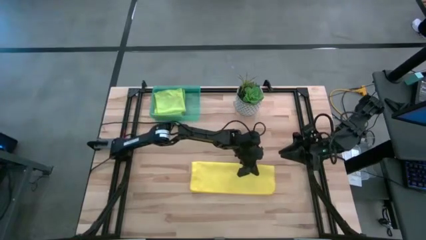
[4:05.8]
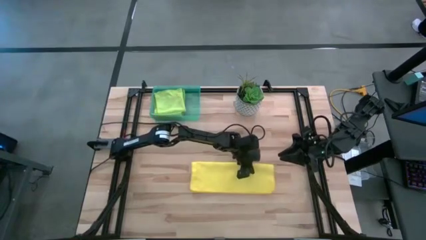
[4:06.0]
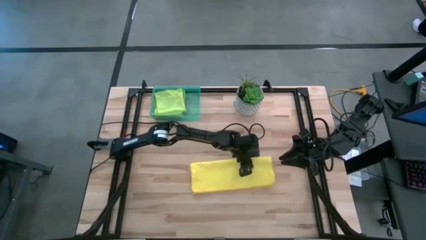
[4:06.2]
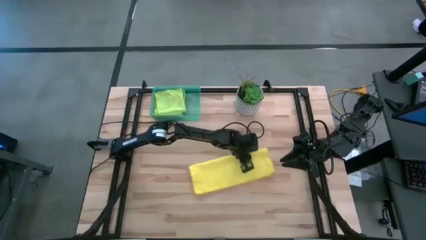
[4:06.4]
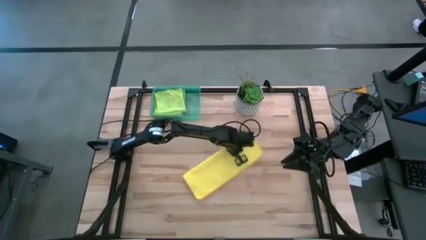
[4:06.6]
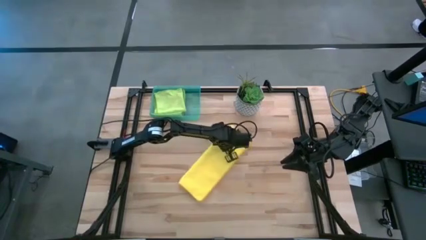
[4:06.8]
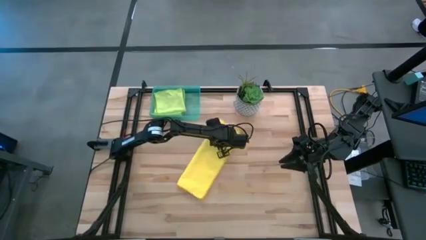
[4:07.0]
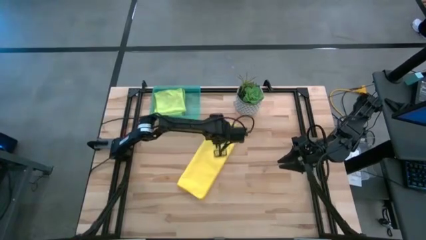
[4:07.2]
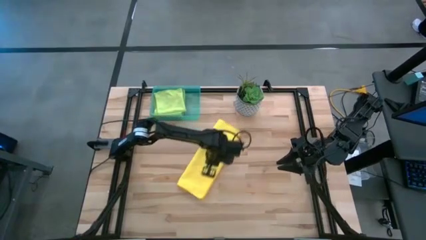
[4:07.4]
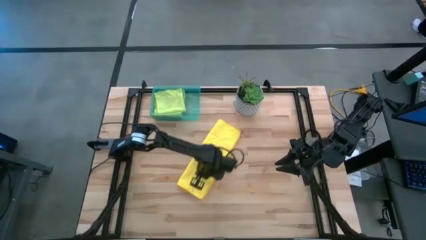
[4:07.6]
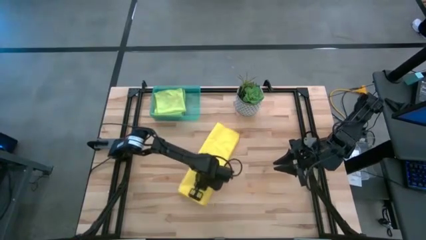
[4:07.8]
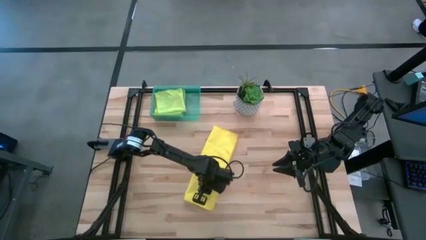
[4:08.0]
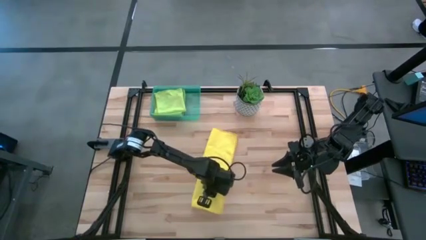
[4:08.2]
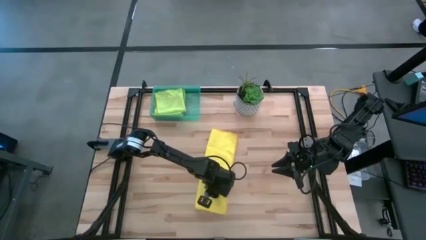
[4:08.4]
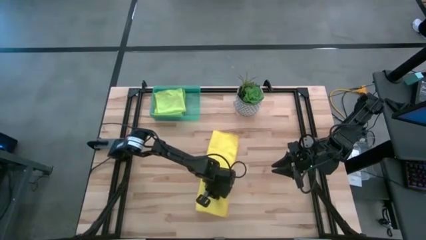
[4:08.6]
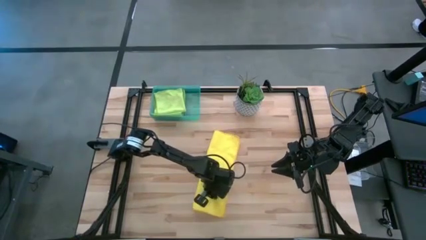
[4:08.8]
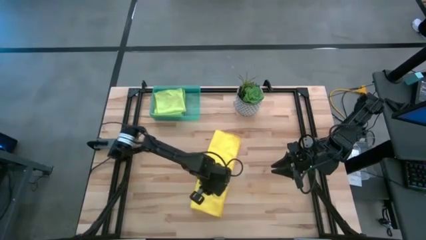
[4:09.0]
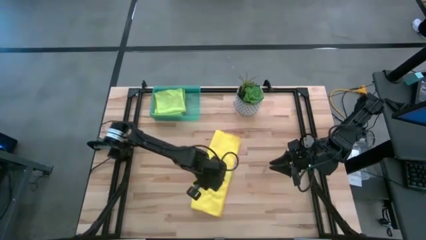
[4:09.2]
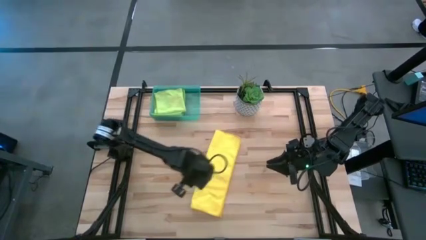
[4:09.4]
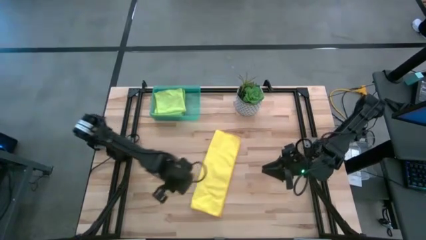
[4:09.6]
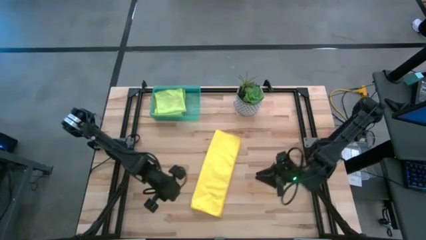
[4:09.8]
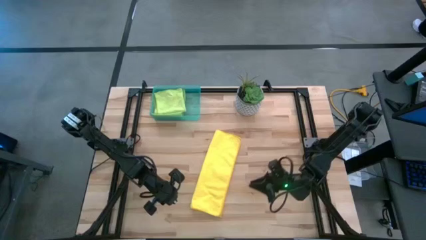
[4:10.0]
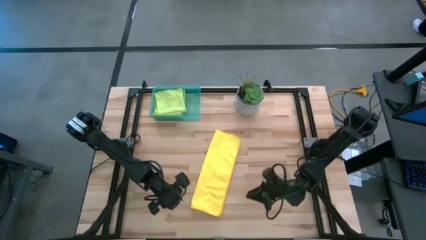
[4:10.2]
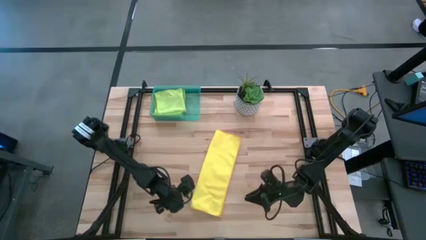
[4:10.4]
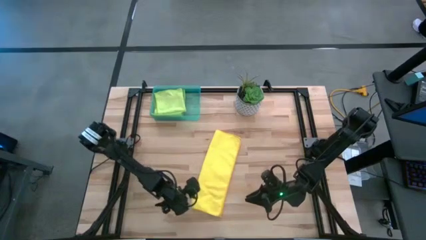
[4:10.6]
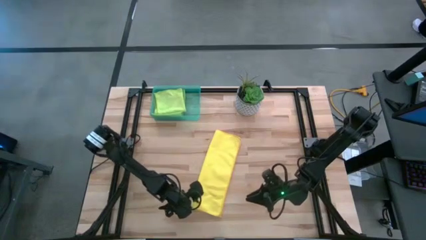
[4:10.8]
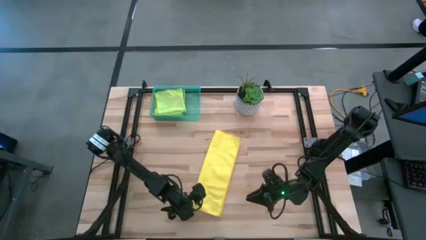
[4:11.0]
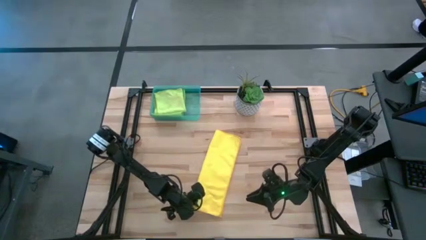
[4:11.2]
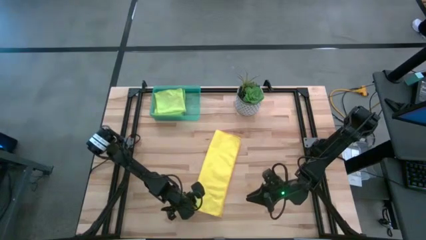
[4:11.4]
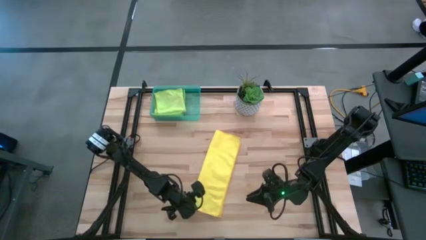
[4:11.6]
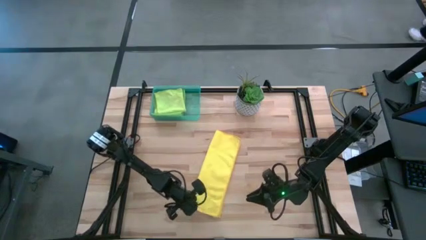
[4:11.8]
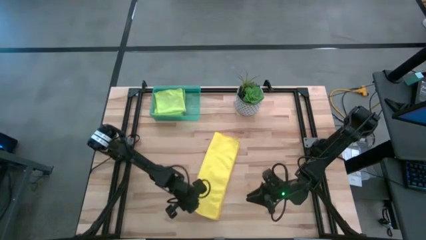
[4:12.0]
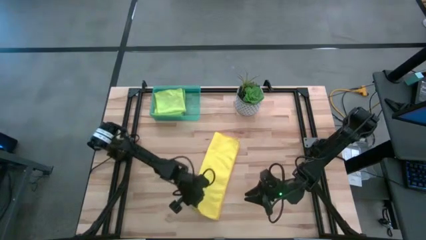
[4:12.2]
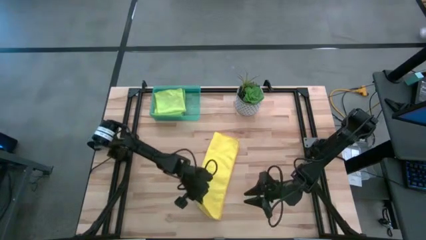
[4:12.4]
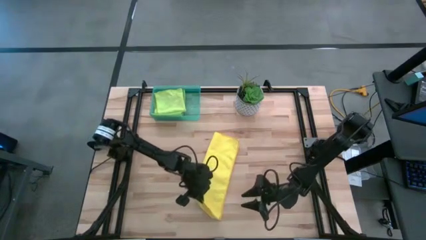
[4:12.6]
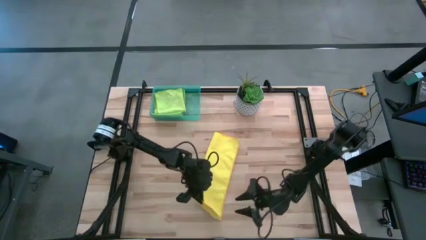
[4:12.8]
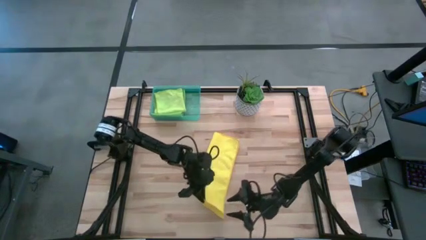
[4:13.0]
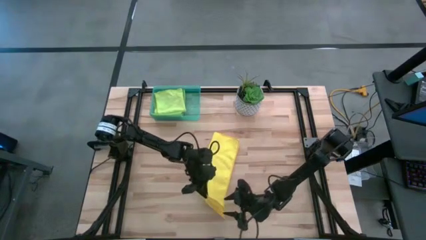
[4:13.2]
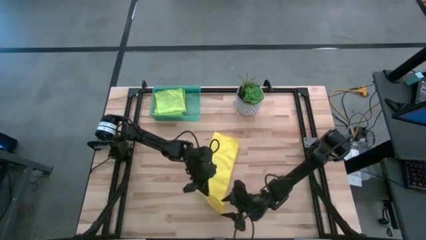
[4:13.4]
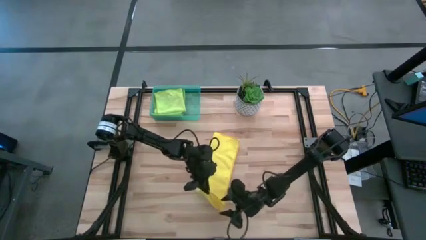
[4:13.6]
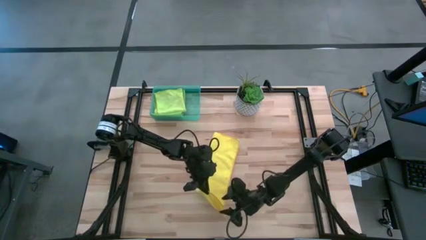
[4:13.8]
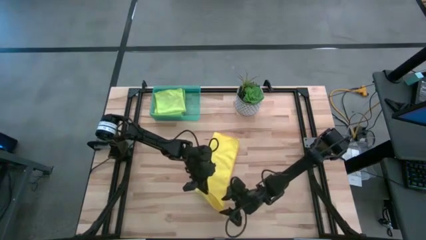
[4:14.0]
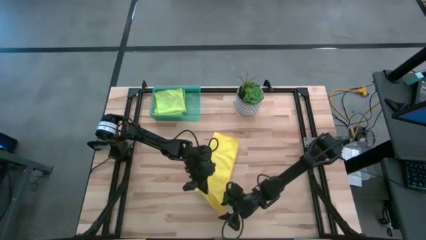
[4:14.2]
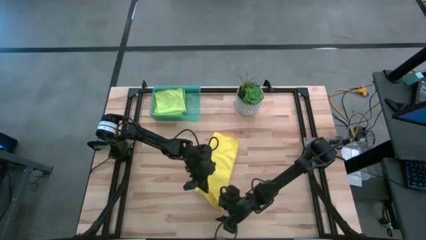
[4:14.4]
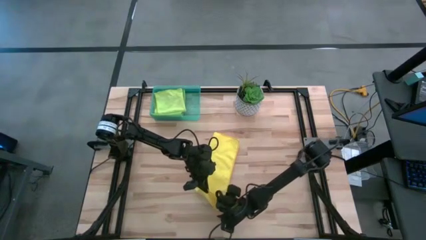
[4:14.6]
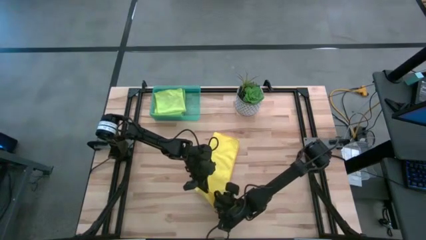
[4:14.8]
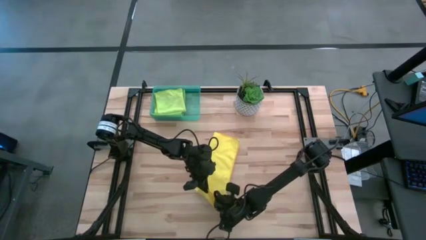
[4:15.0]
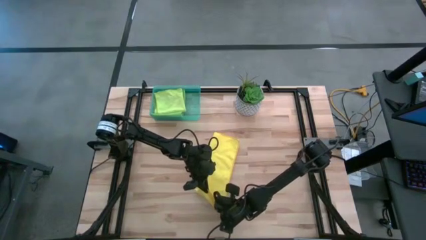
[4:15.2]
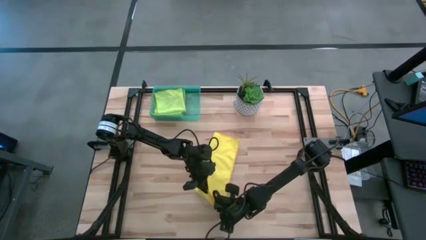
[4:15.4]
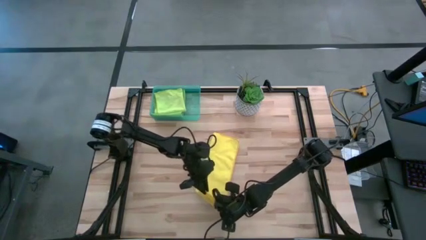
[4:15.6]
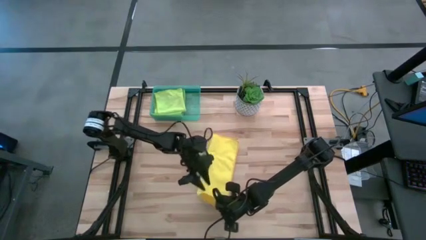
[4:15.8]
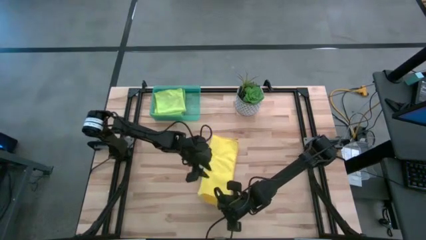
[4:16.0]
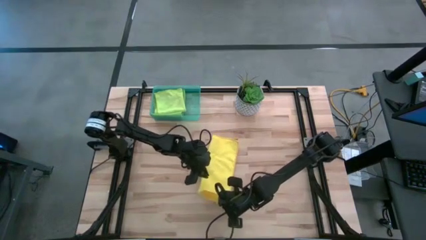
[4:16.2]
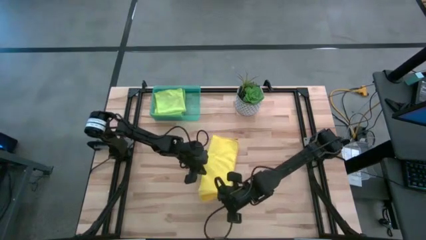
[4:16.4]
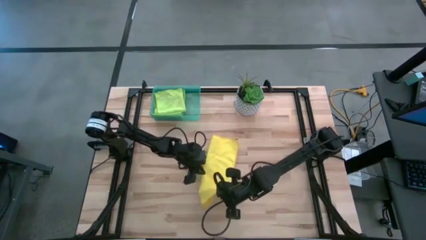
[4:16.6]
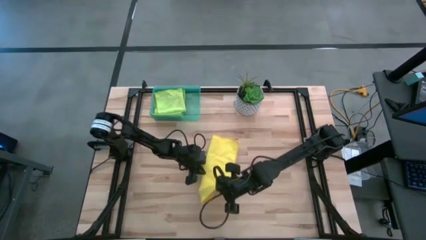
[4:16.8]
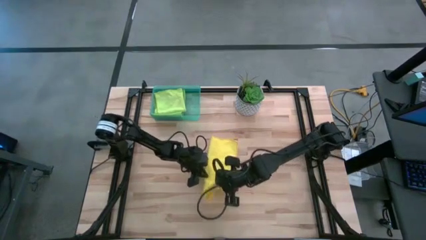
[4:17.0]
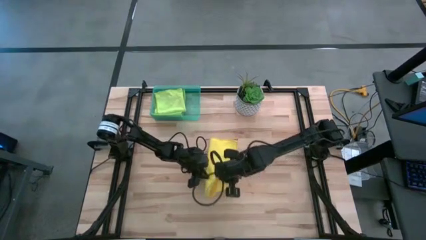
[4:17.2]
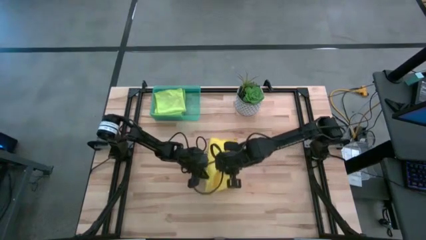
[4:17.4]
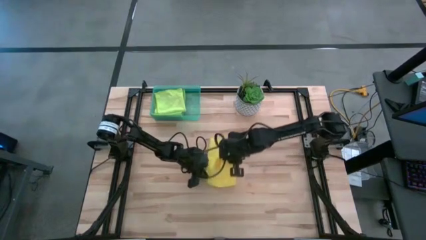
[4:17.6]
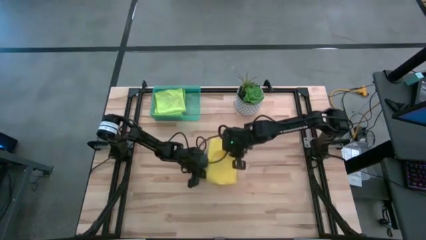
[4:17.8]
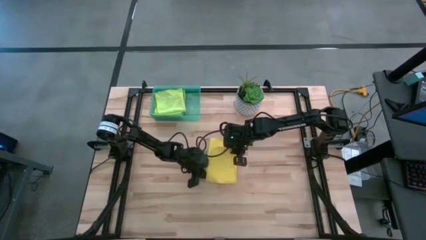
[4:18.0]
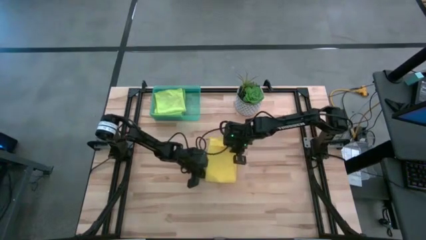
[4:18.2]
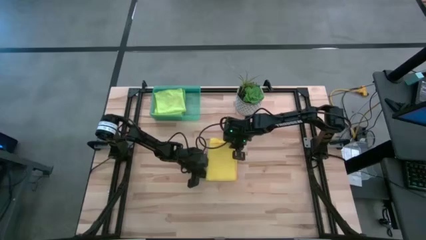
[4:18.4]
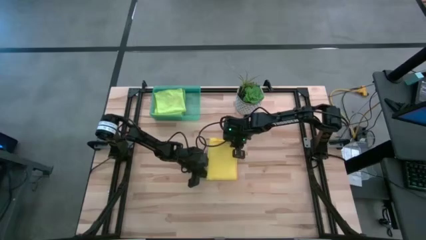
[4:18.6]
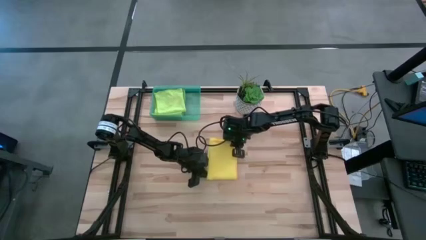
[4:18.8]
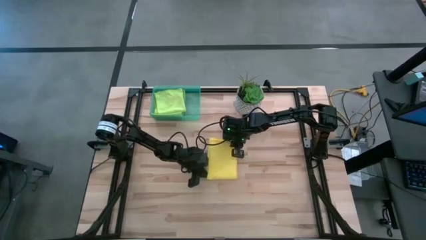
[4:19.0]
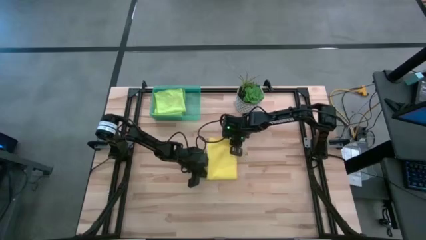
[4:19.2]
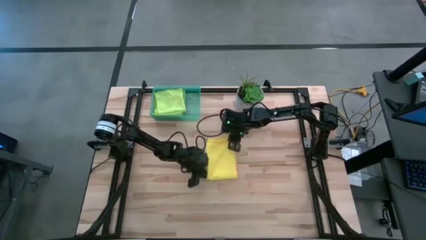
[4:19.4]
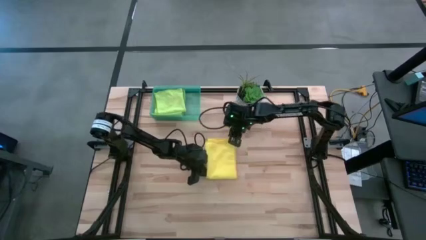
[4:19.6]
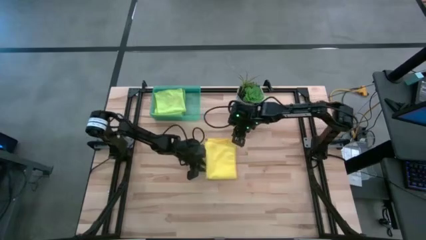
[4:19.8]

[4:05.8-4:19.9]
Task: Fold microfiber towels
Fold the yellow microfiber cloth
